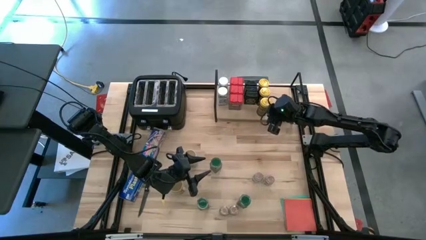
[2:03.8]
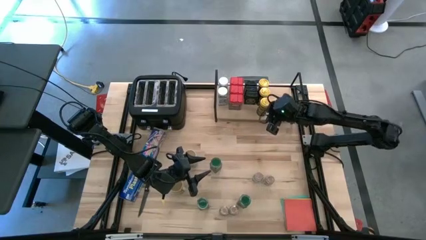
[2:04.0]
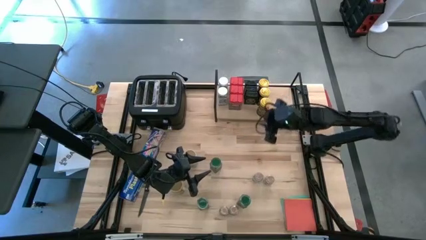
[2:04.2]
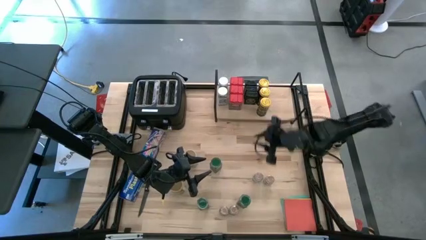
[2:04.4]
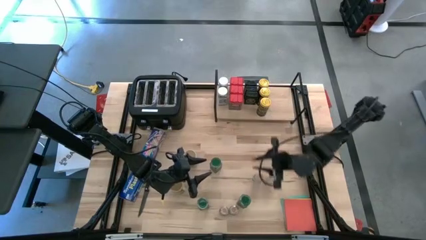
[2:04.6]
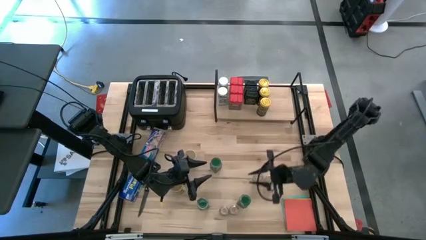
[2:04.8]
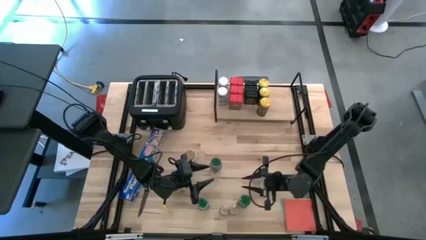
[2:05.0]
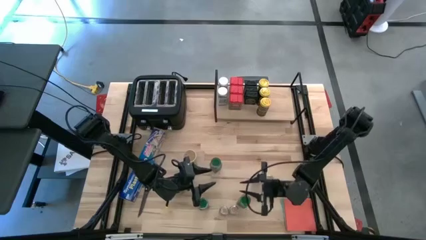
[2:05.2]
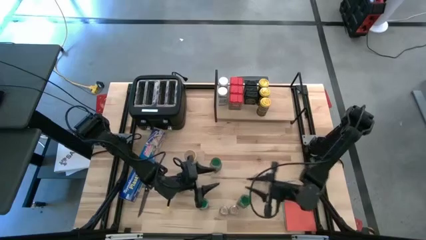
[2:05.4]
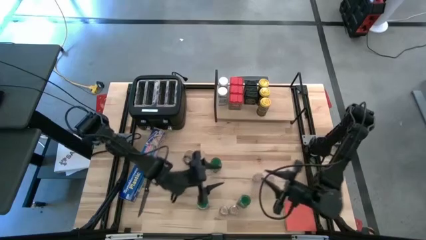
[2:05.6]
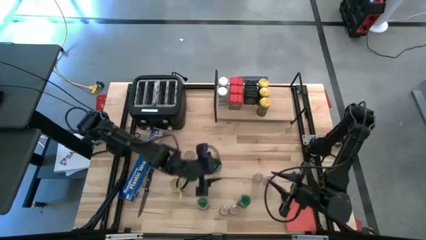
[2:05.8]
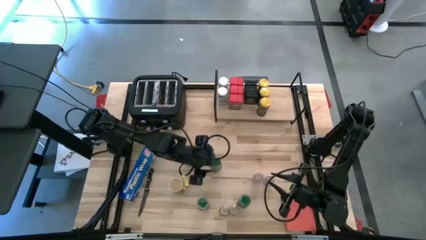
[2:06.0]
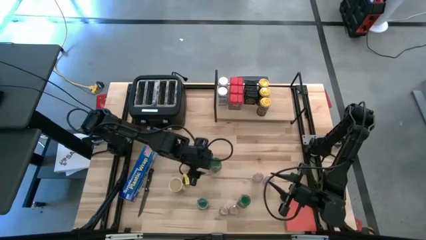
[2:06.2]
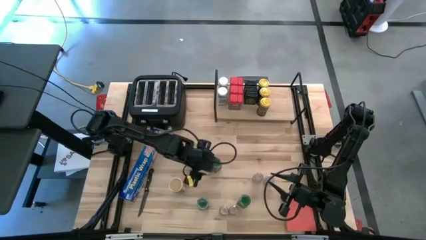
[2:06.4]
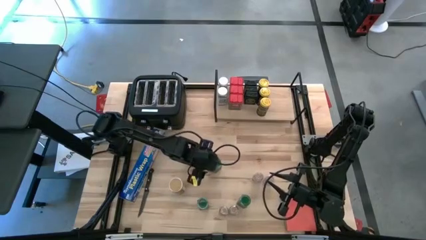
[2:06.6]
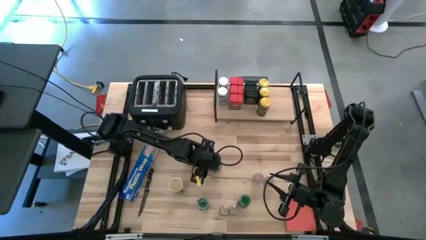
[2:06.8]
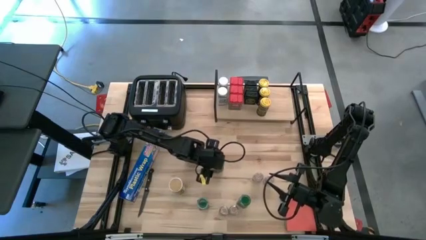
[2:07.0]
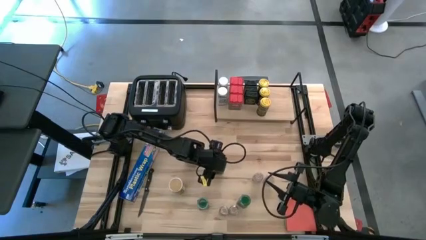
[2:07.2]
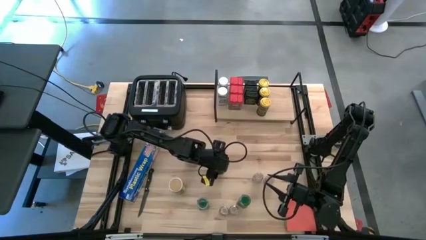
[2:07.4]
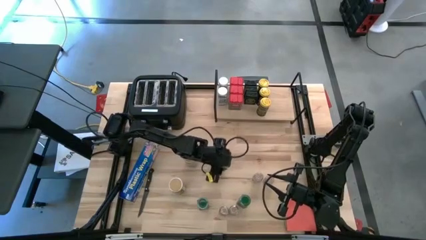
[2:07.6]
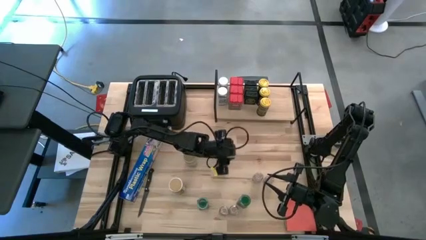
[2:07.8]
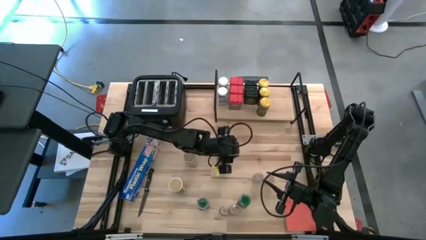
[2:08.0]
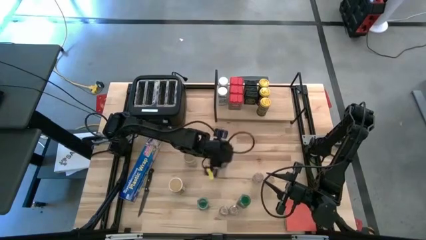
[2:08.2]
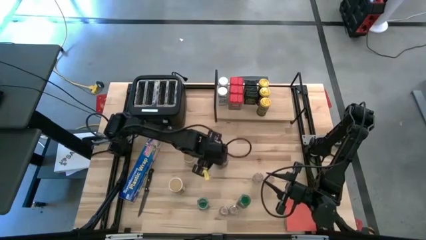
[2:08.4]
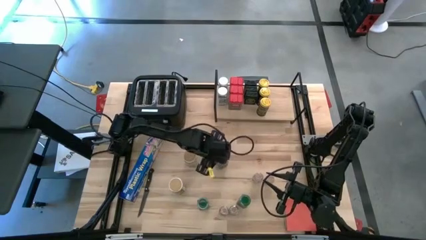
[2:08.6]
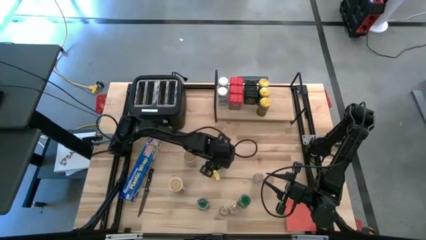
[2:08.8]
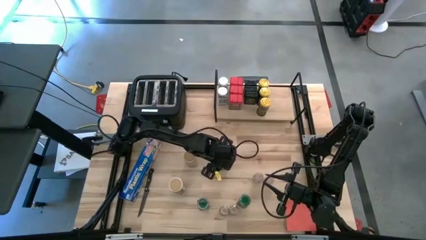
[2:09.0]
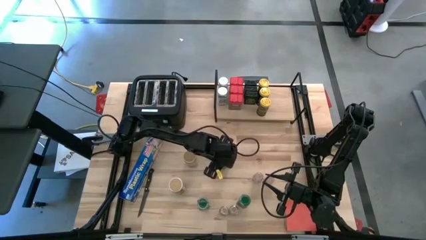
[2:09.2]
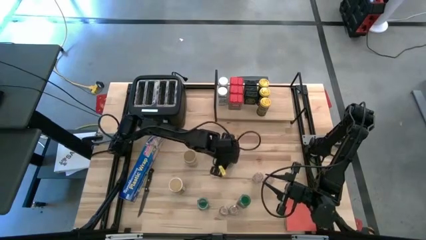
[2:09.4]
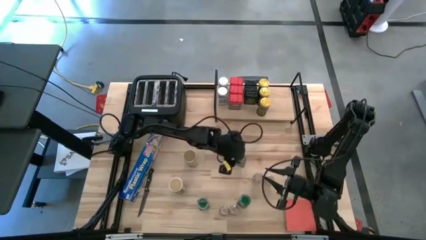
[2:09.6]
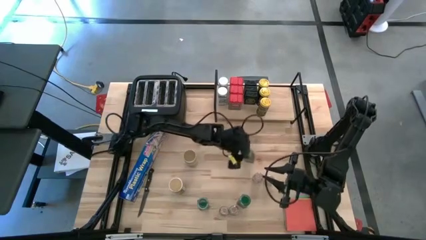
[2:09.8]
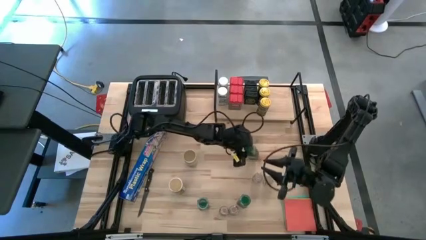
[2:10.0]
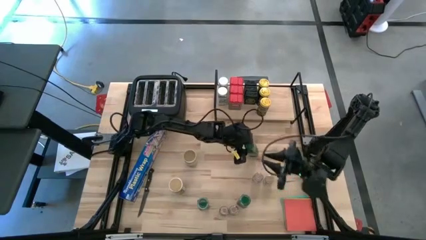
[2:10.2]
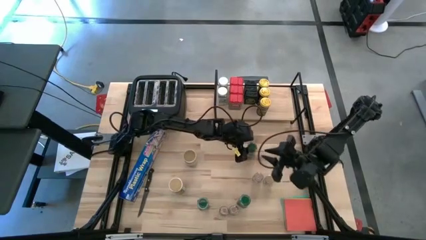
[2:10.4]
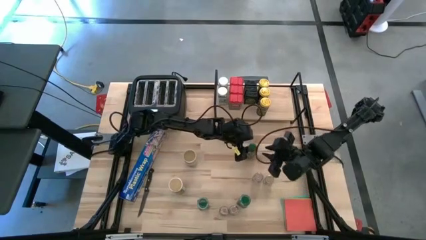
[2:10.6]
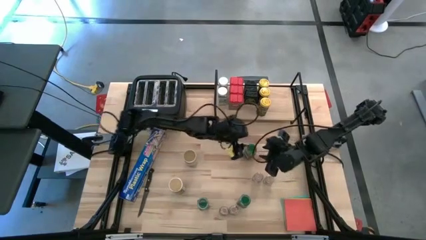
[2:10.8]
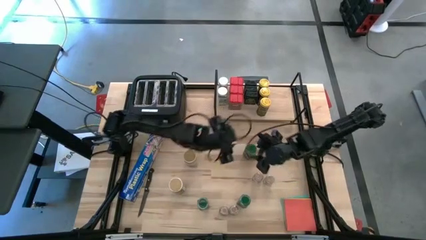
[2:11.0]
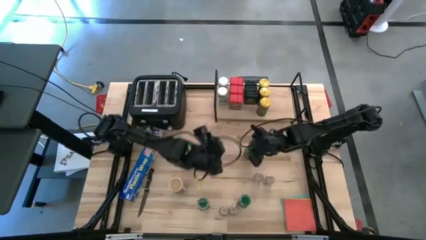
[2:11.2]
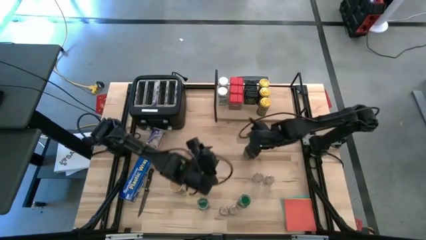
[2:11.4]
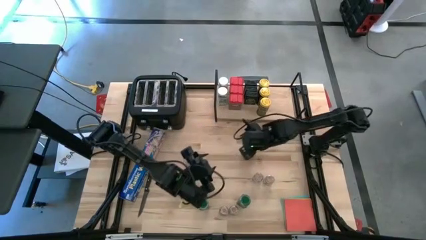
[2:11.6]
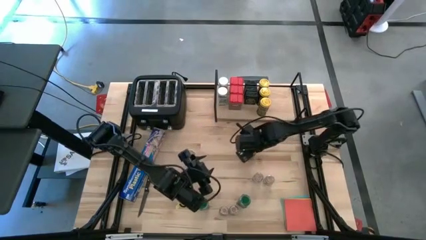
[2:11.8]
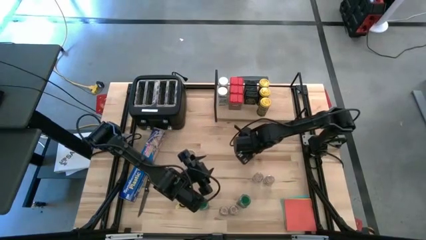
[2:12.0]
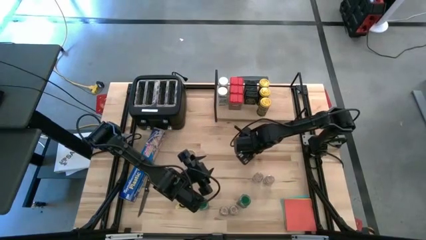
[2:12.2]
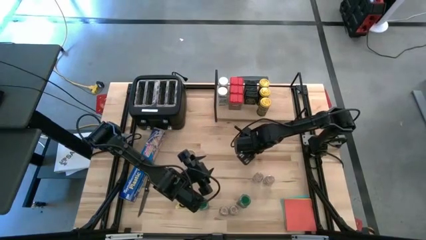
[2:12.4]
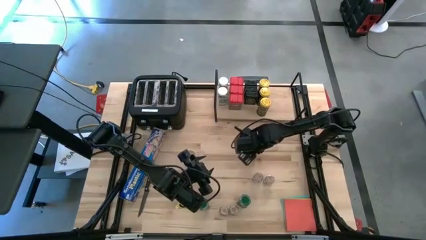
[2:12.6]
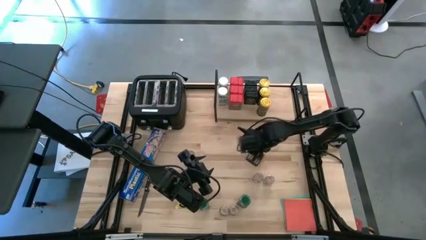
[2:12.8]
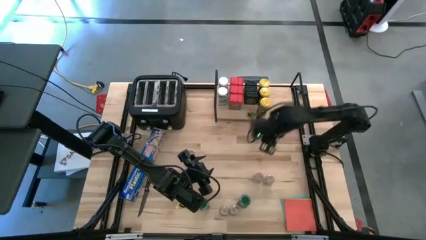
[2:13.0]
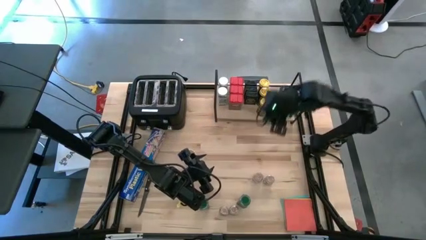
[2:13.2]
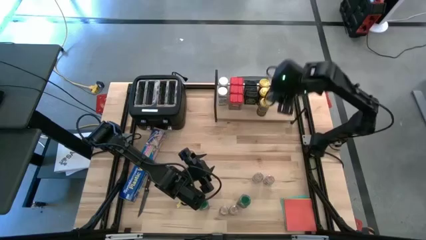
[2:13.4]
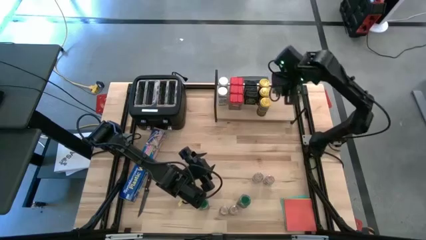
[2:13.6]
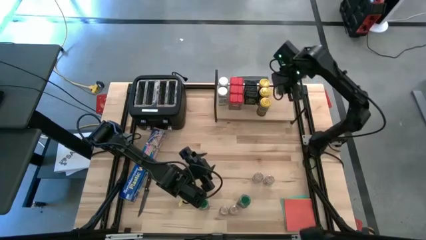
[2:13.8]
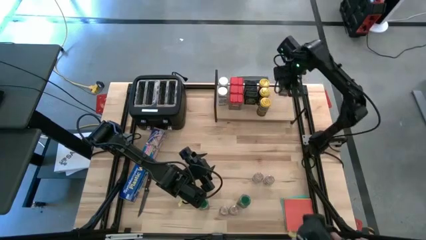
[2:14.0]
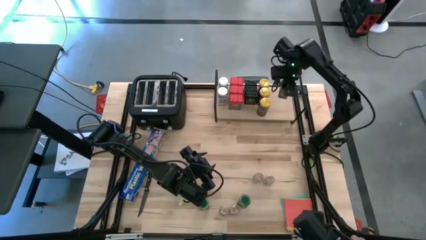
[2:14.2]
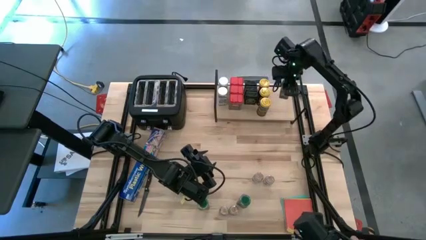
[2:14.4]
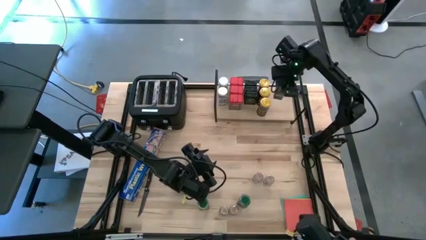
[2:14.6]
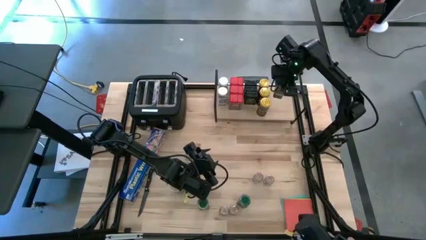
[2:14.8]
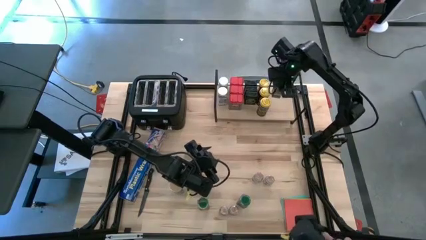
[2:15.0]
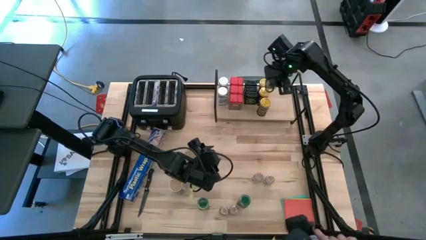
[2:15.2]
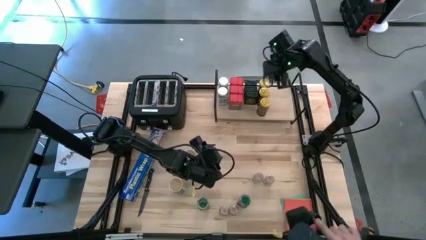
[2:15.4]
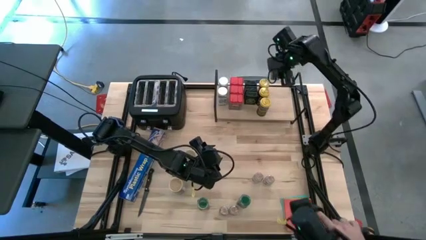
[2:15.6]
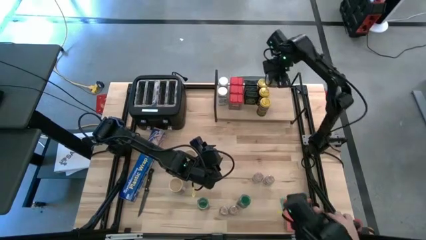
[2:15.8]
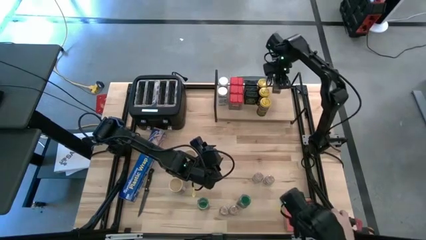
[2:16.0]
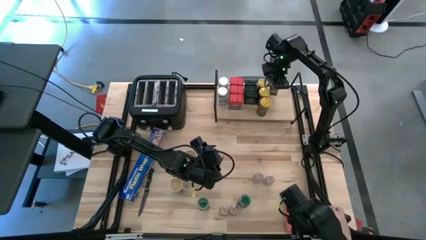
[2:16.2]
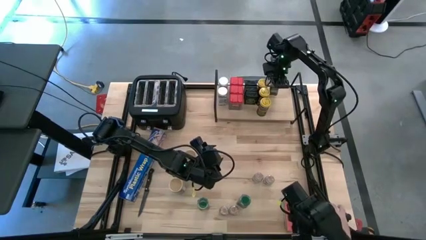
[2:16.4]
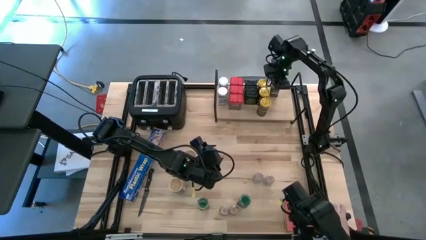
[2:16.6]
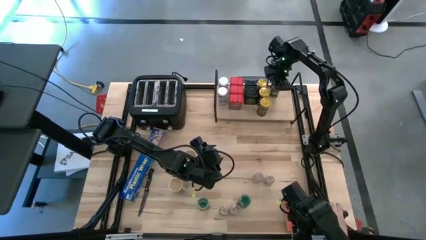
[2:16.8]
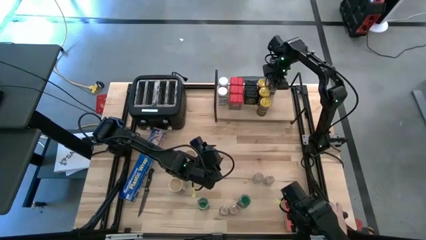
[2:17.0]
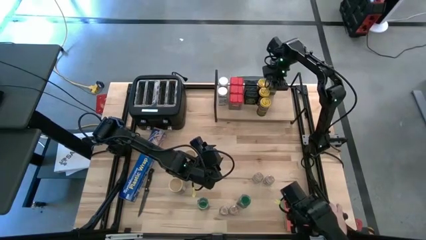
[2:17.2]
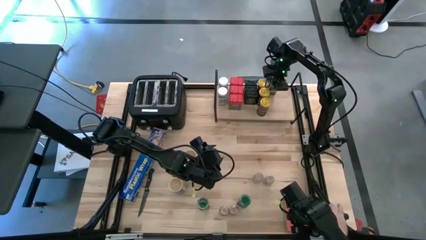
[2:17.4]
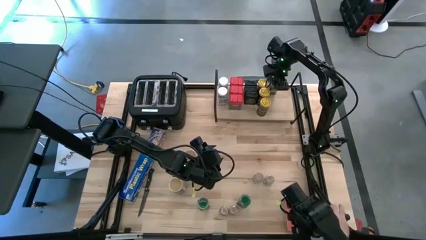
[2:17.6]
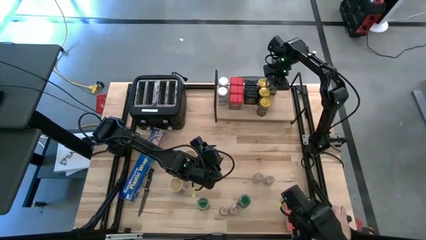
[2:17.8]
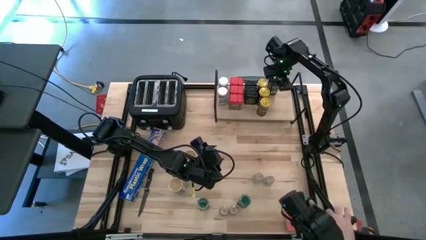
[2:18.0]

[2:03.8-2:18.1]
Task: Shelf spices
Put the top right green seasoning bottle on the shelf
